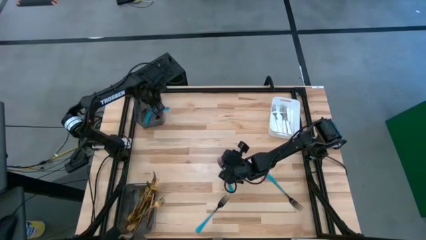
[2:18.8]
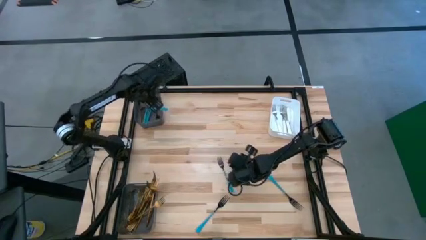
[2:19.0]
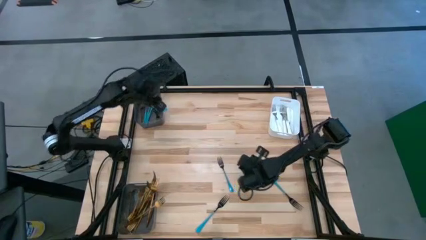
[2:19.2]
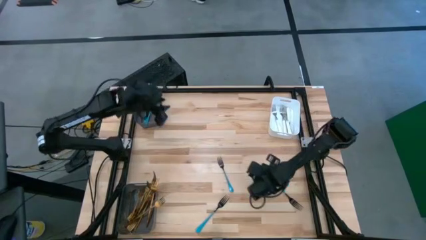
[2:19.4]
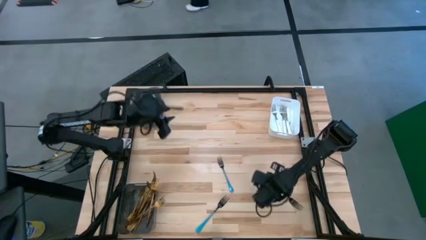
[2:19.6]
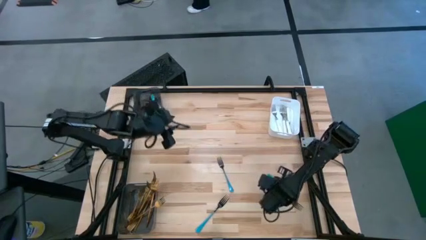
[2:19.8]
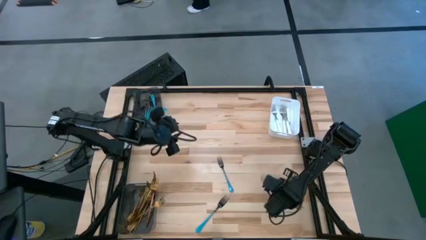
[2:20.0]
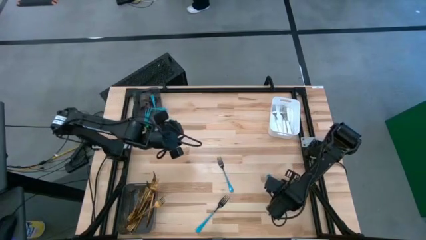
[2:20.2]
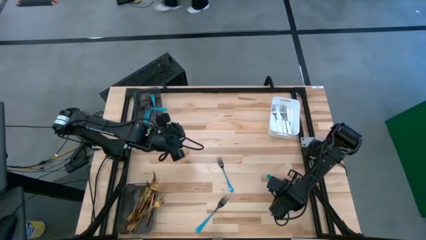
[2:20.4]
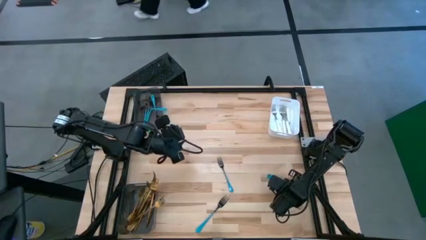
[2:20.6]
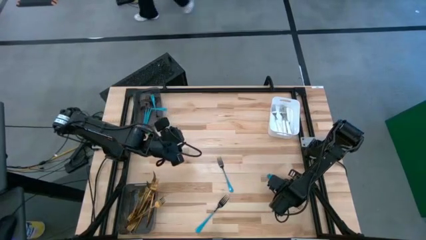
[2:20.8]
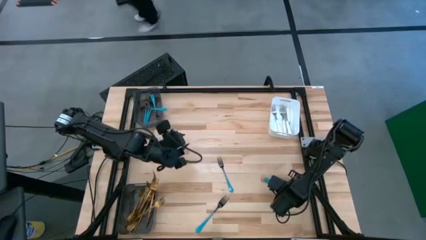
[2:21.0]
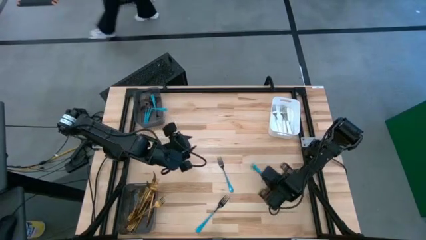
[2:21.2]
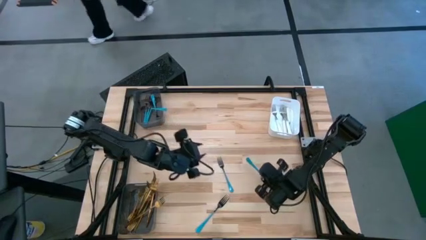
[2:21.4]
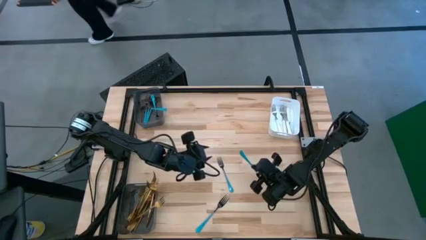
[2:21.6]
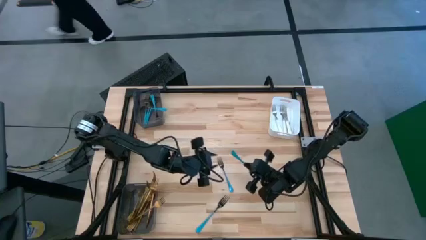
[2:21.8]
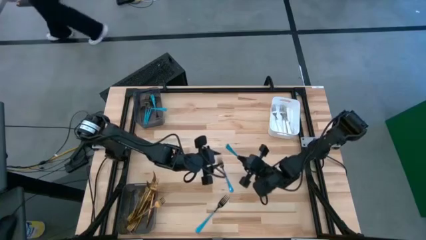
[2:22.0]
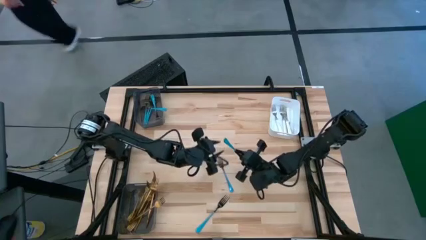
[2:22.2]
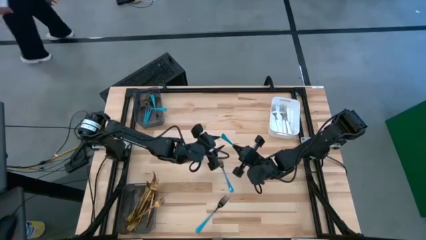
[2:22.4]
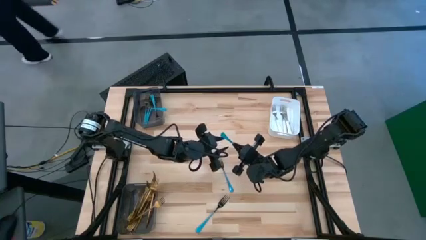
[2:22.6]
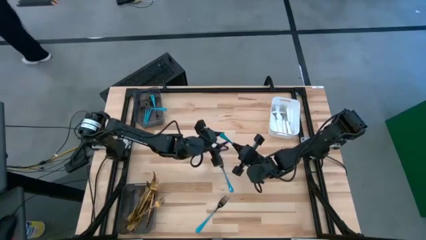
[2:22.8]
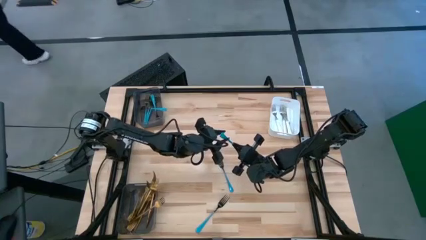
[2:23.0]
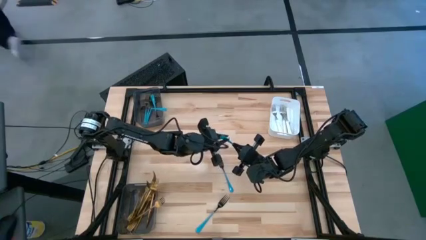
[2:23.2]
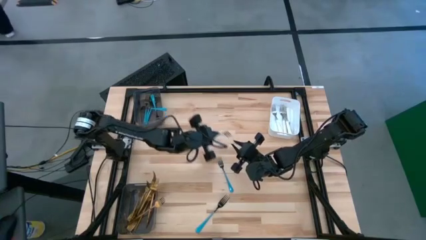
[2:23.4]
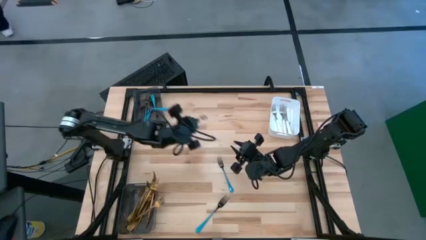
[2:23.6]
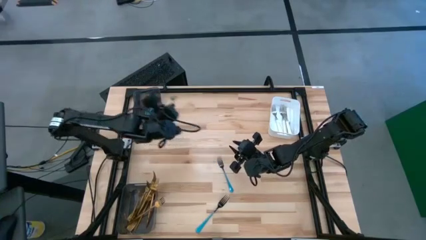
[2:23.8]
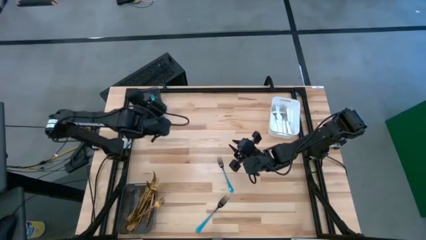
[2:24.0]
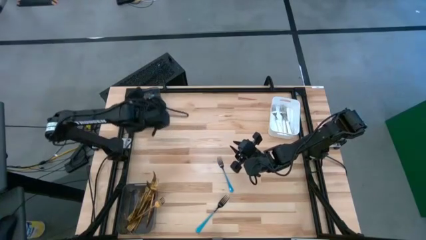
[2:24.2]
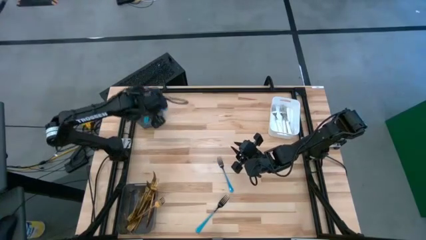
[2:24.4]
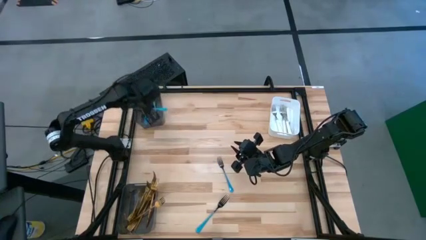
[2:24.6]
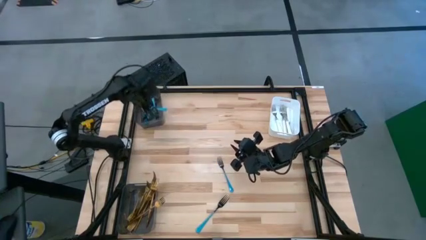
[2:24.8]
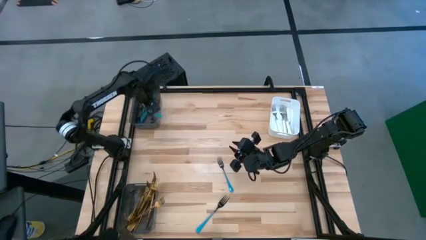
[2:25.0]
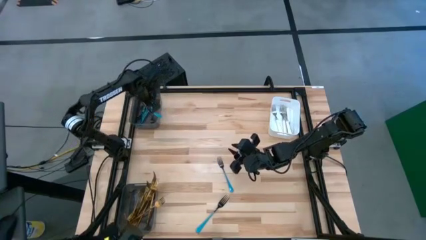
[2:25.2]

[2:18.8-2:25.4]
Task: Sort silverware by color (type)
Put the blue fork into the top black bin

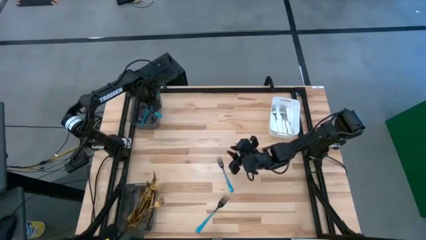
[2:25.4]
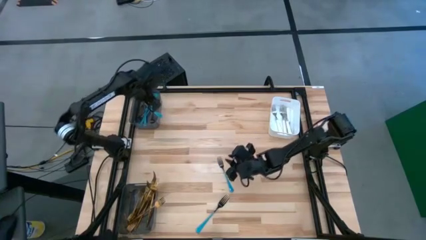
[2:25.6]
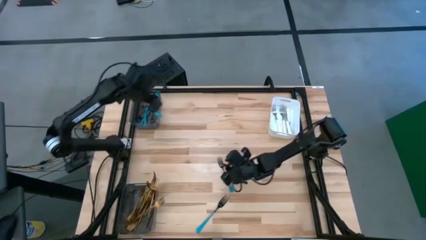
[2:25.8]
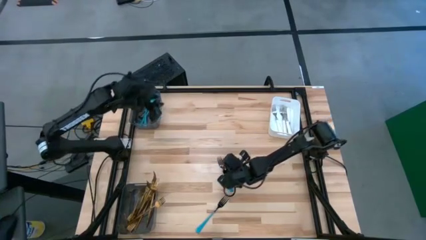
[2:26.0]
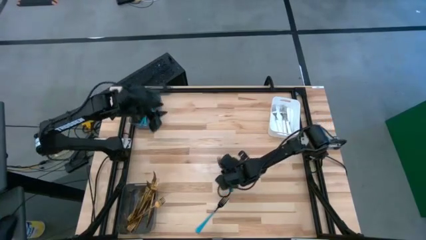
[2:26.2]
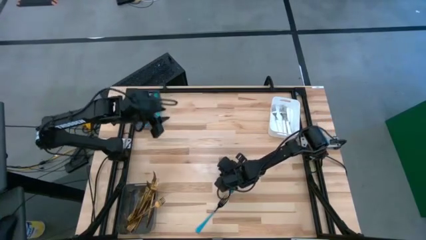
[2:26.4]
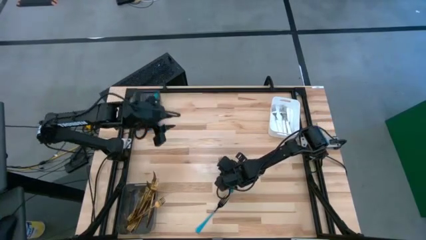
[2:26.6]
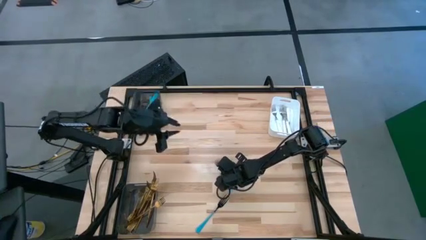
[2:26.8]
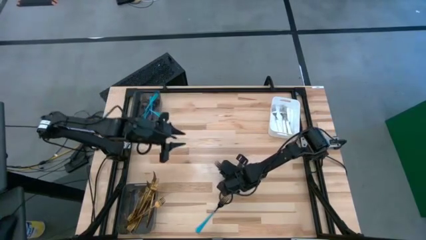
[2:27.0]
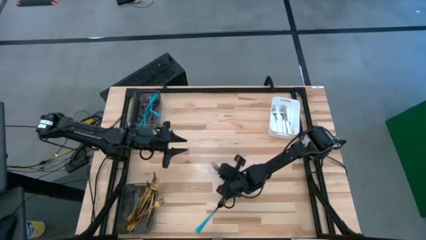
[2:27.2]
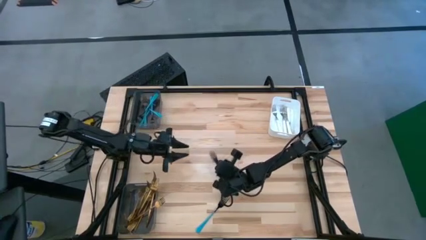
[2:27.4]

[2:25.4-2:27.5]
Put the blue fork into the top black bin

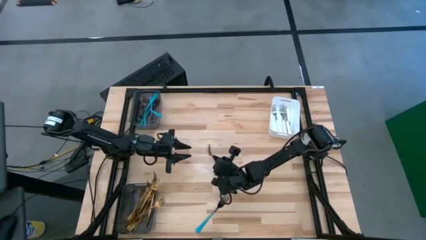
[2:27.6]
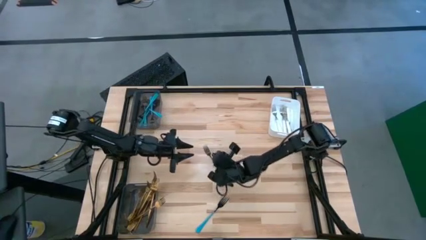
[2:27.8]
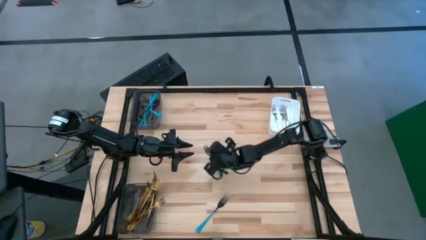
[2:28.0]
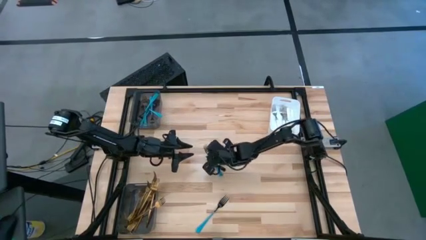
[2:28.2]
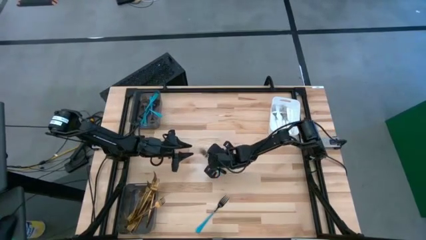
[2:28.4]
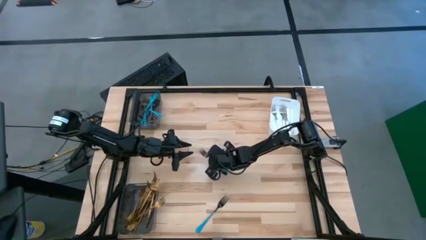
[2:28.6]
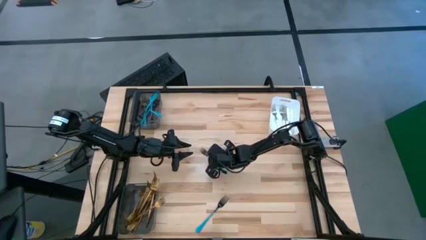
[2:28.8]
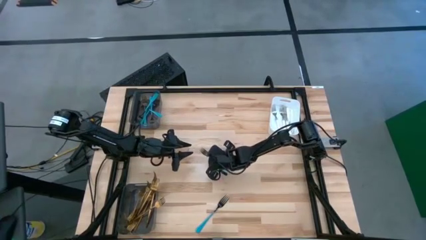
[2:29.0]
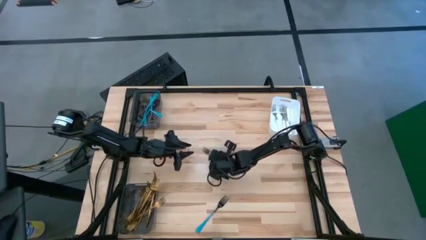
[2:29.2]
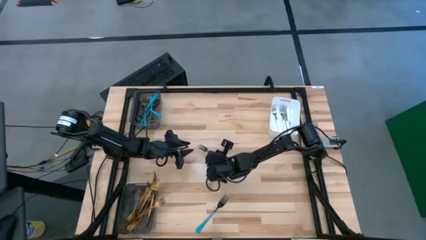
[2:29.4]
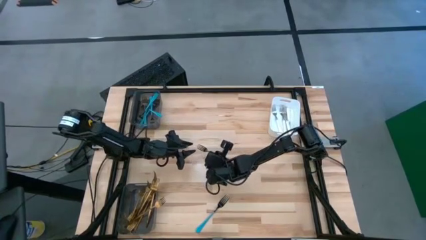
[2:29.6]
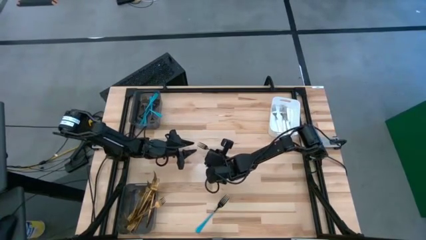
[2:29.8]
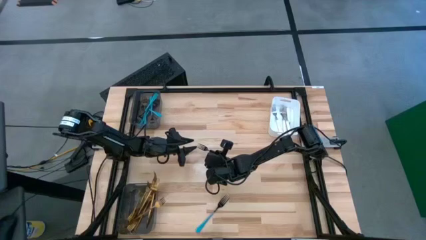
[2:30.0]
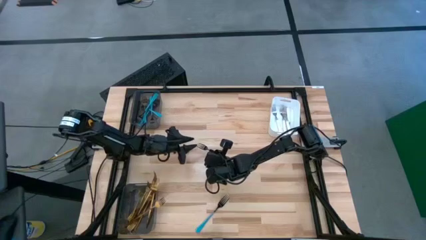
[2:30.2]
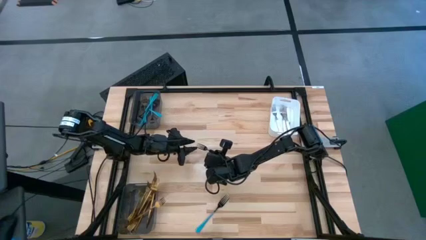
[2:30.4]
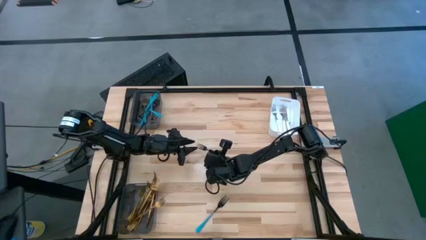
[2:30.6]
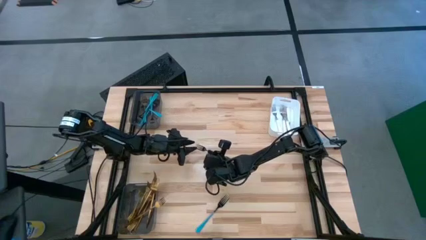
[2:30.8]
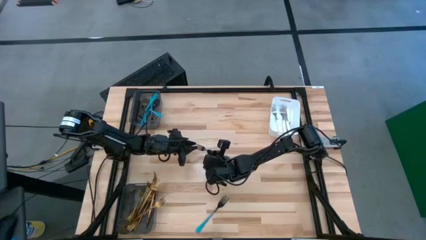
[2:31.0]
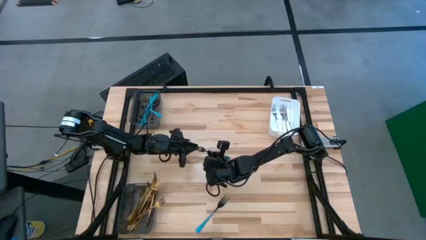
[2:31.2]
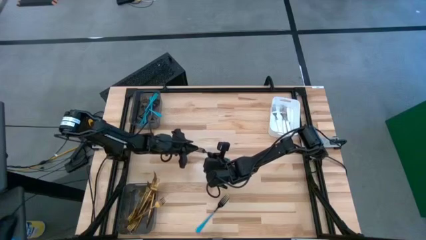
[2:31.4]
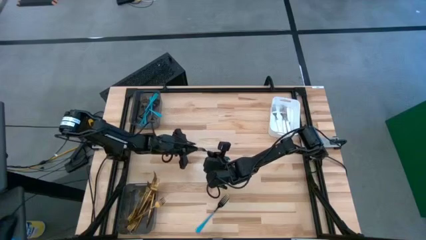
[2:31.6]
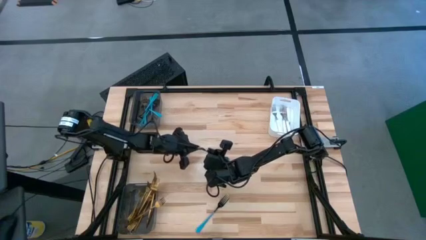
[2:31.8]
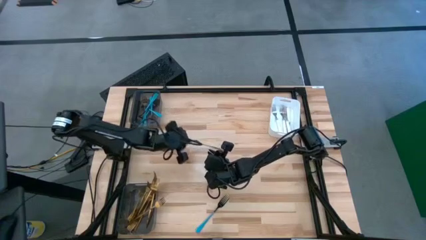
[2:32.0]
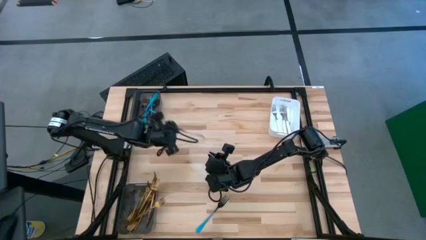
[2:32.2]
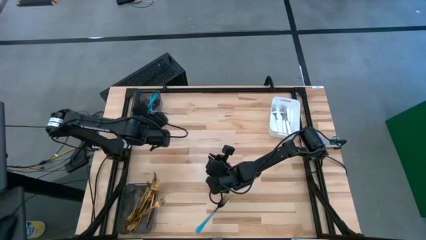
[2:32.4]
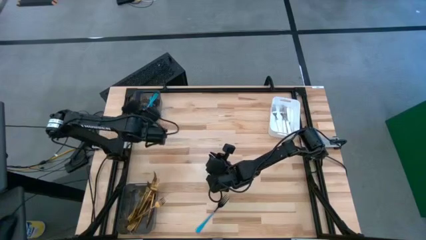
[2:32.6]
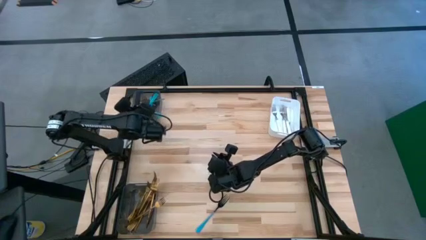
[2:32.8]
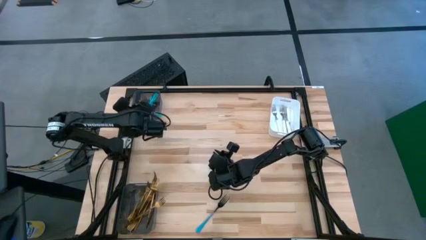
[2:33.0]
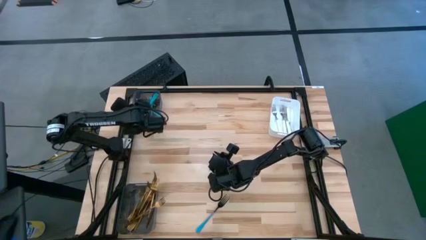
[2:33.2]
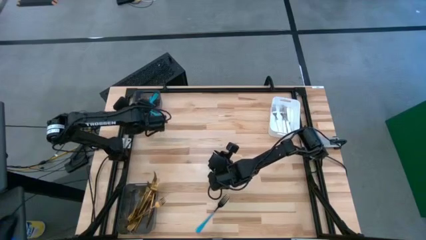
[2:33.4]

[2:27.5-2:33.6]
Put the blue fork into the top black bin
